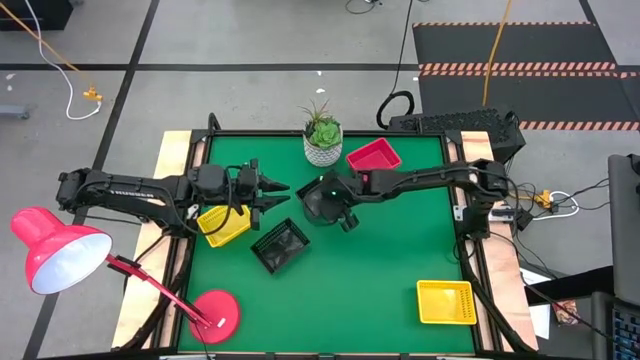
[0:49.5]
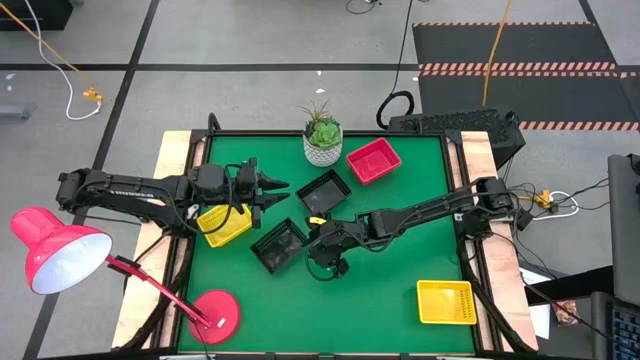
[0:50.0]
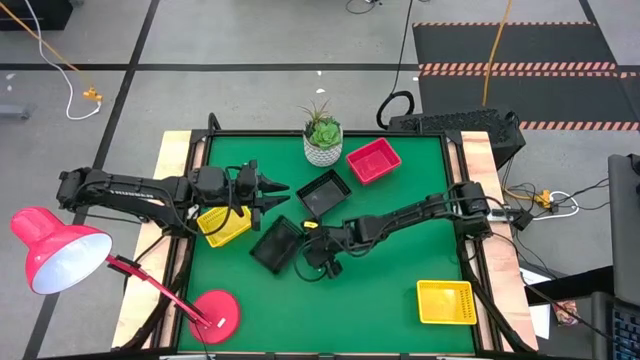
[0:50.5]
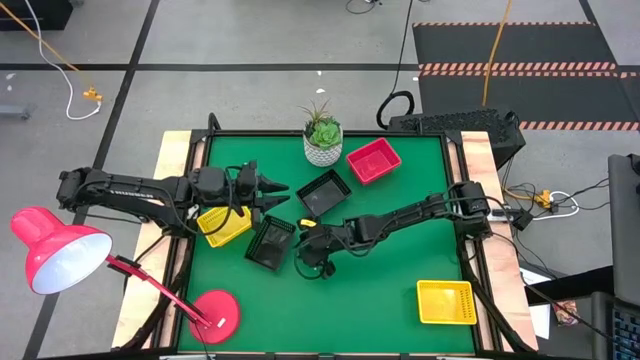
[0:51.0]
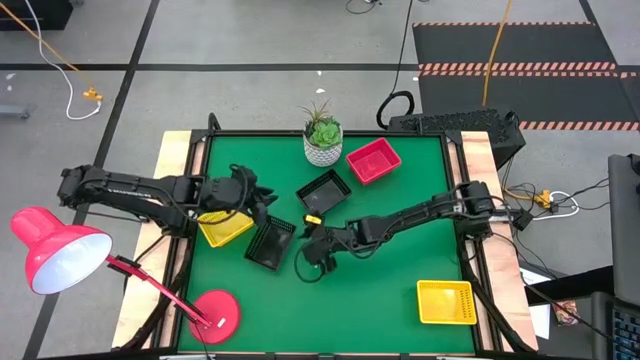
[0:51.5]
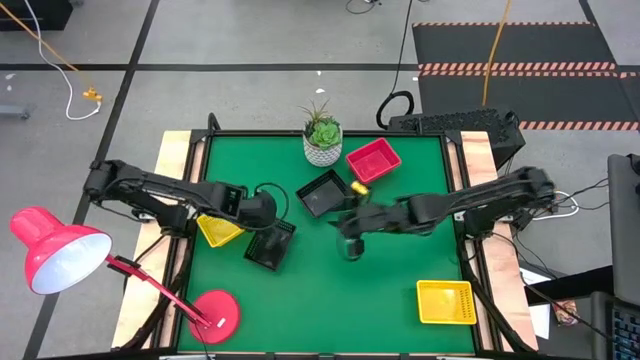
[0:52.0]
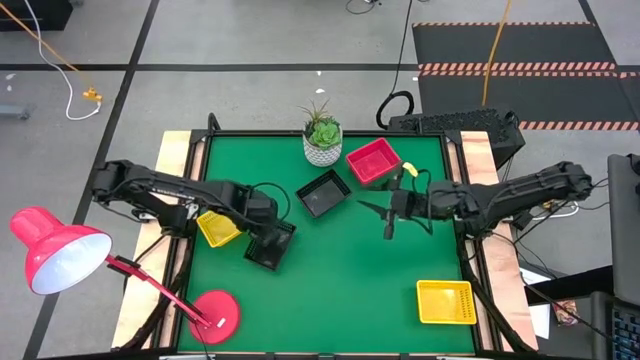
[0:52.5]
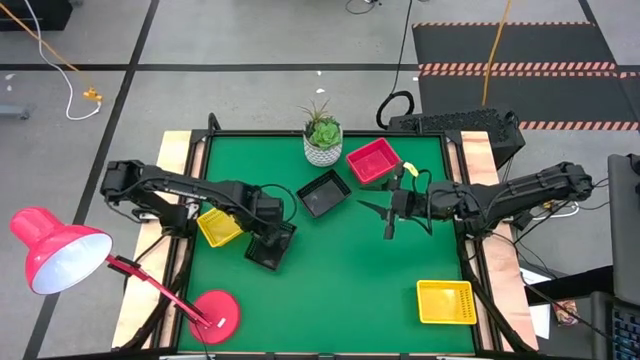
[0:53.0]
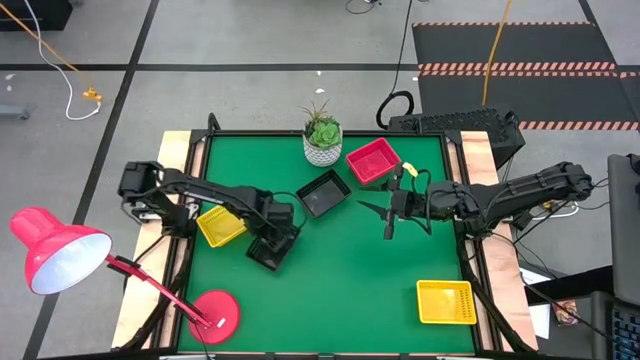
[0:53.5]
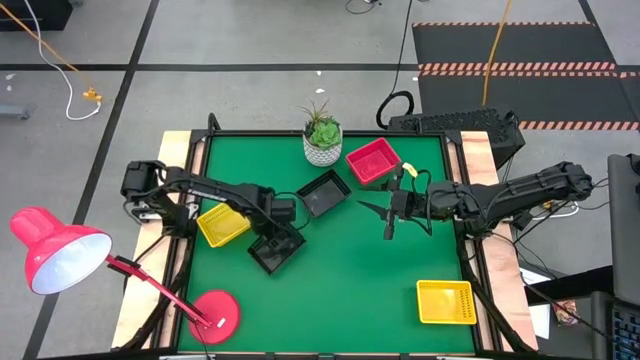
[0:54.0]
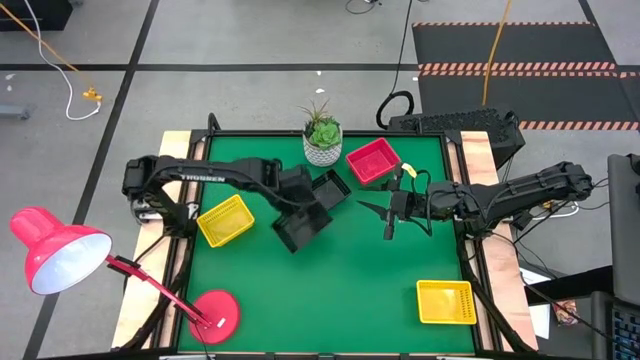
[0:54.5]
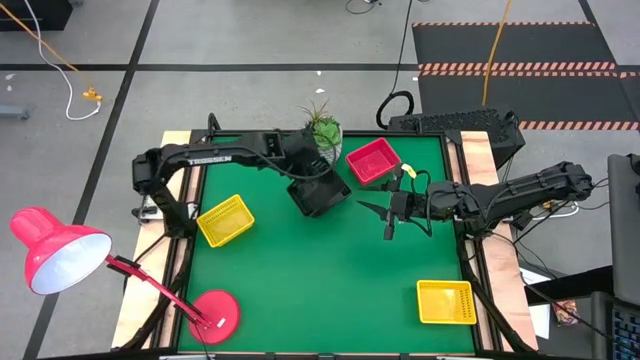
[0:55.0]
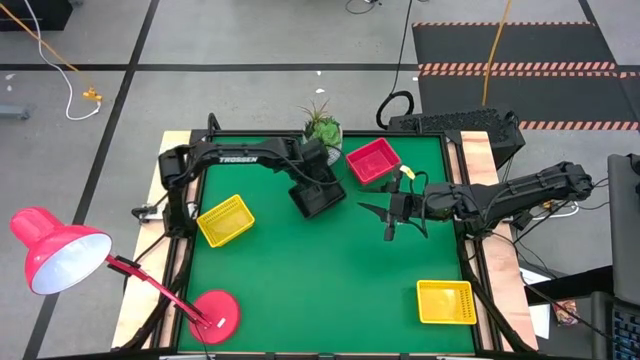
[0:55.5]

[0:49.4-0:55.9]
Stack the bottom black bin on the top black bins

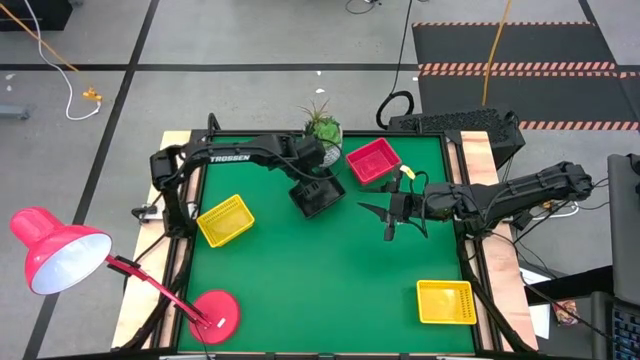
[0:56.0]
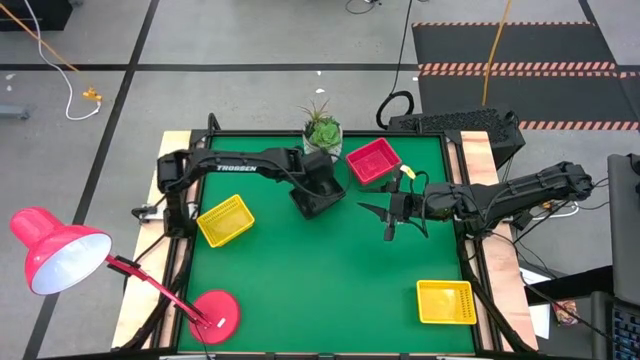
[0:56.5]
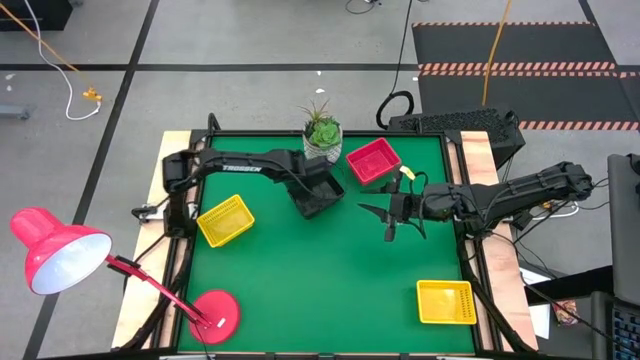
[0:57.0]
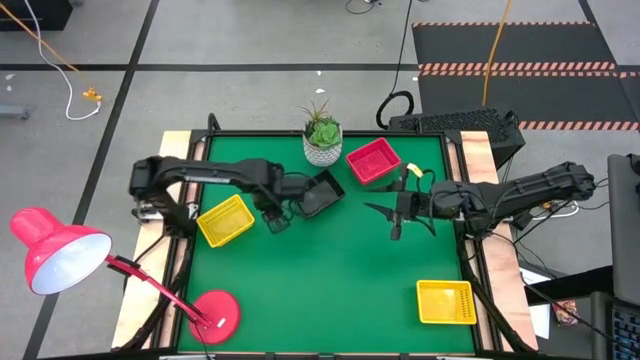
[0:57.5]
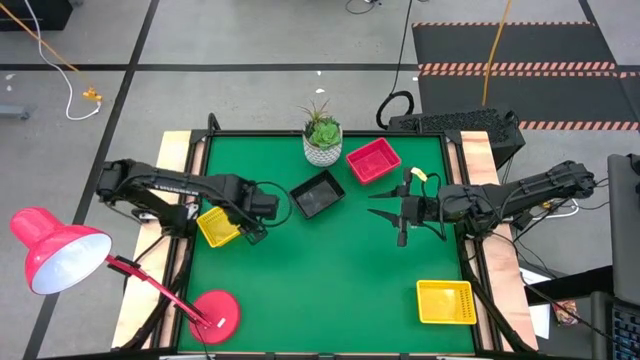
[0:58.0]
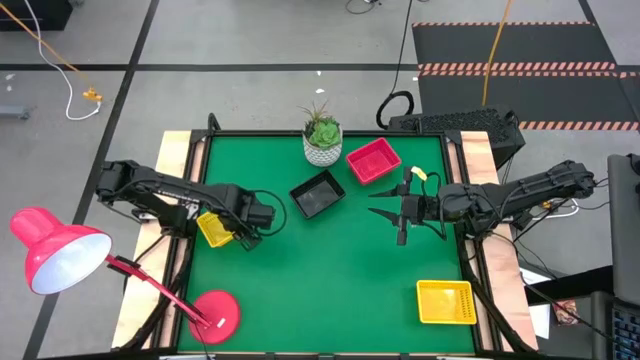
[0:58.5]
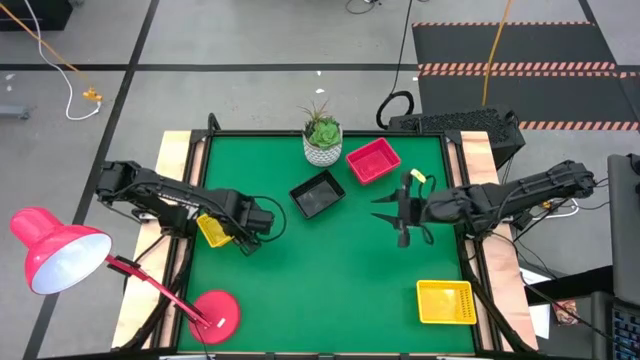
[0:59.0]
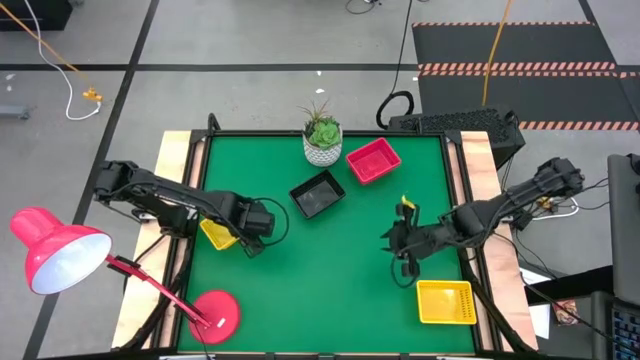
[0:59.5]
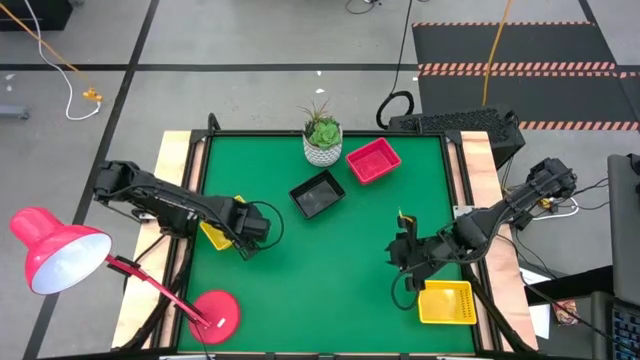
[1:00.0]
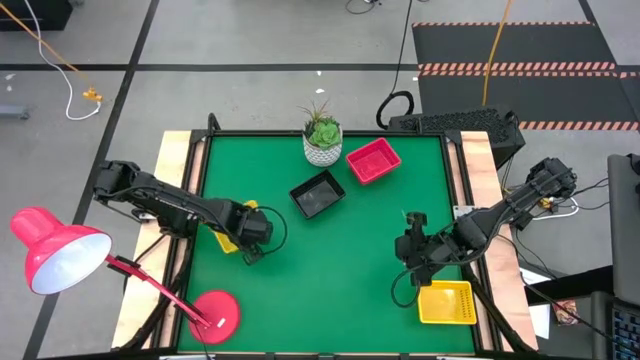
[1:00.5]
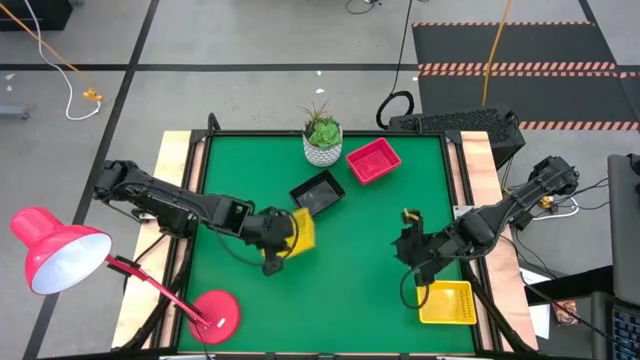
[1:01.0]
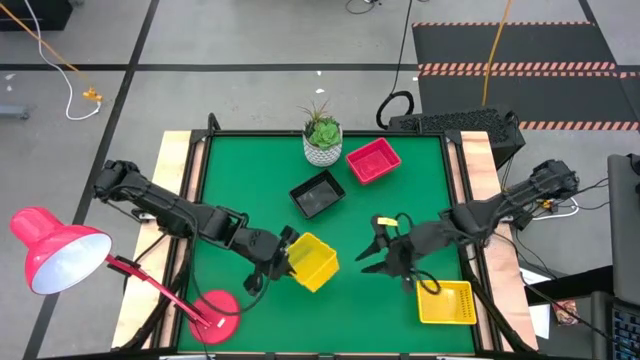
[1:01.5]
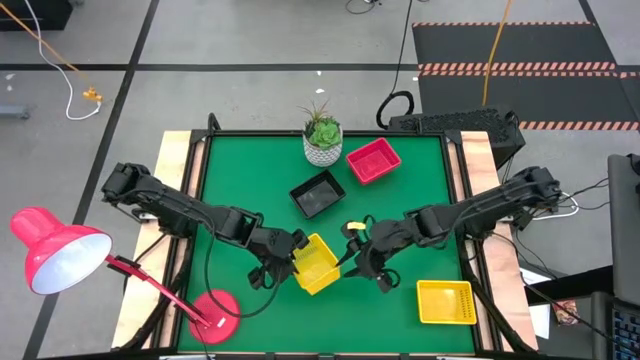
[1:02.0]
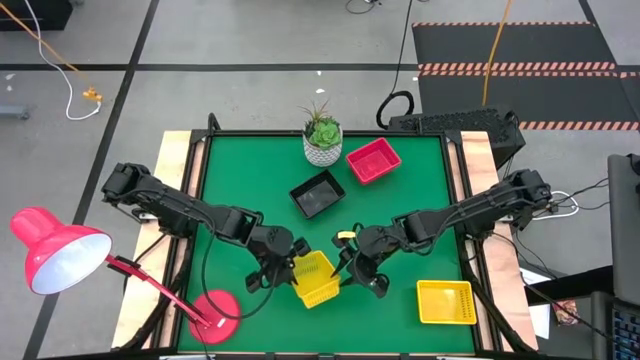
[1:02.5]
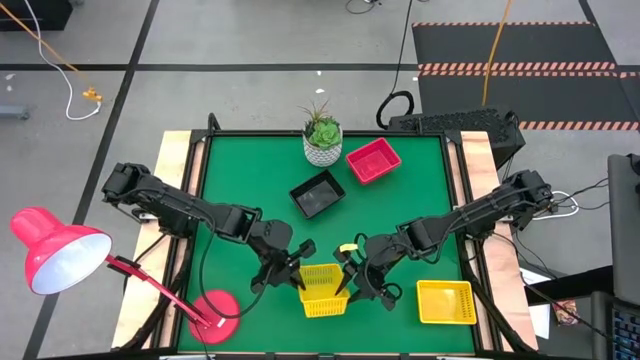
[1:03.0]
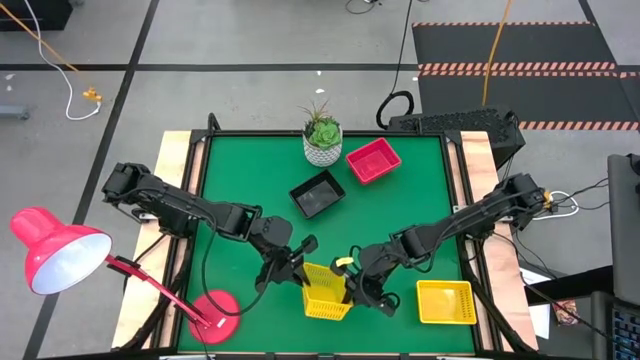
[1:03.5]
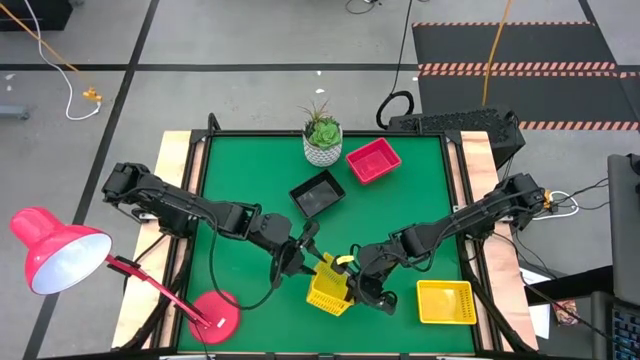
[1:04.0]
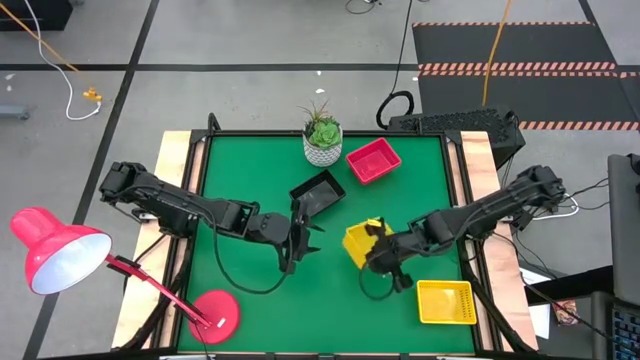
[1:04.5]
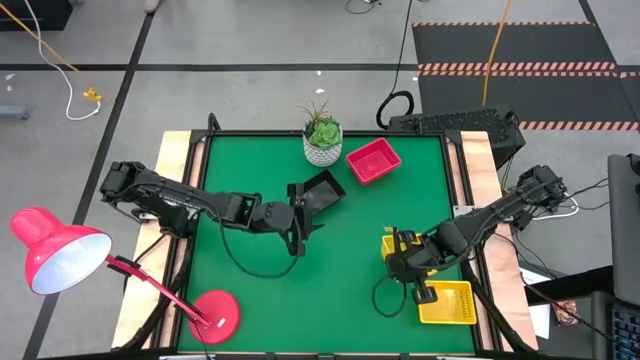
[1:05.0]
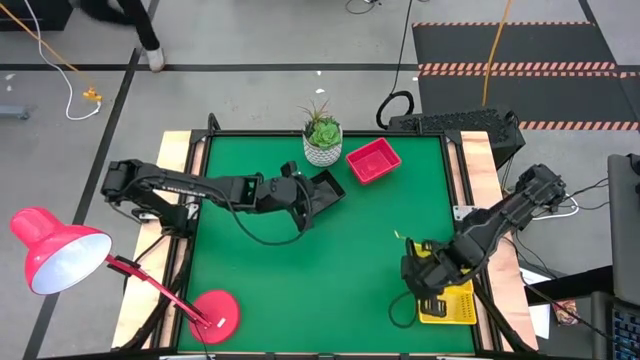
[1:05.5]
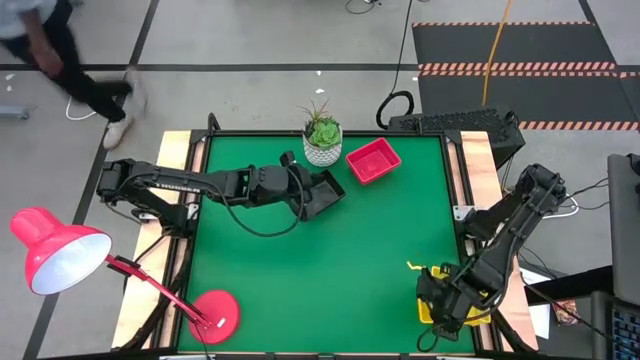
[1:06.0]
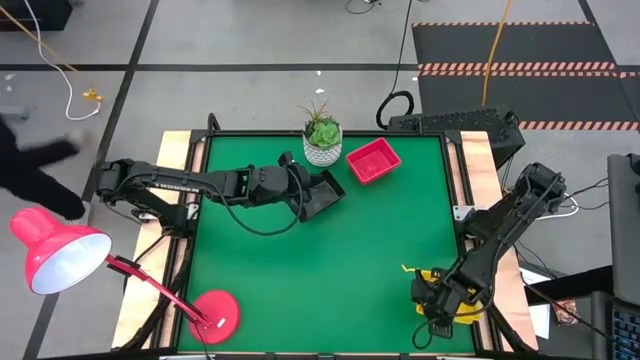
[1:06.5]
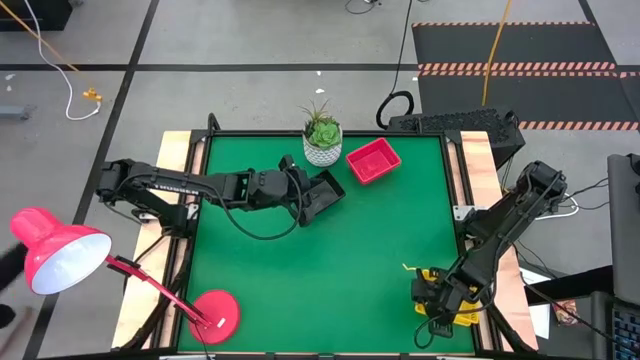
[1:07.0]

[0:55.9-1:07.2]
Stack the top left yellow bin on the bottom yellow bin

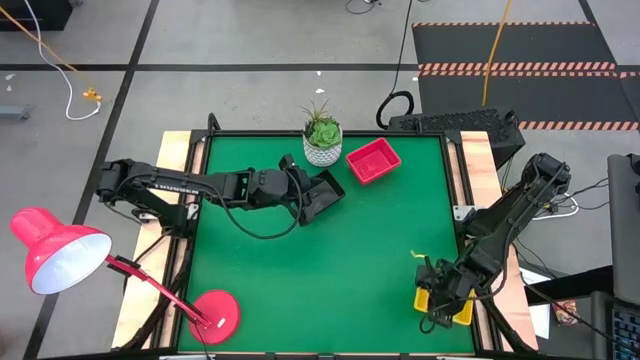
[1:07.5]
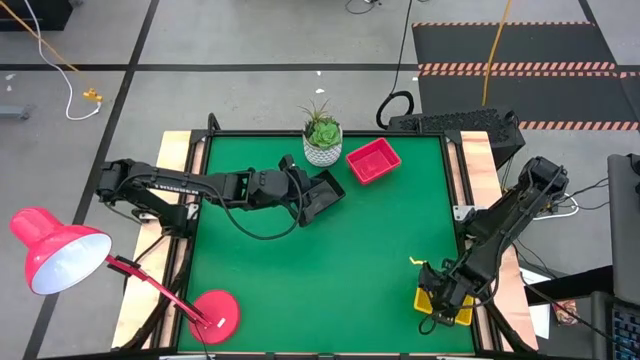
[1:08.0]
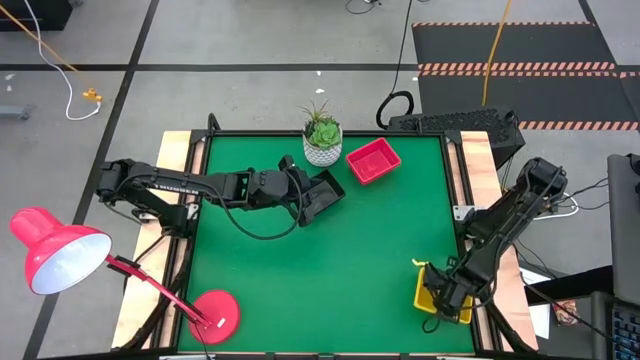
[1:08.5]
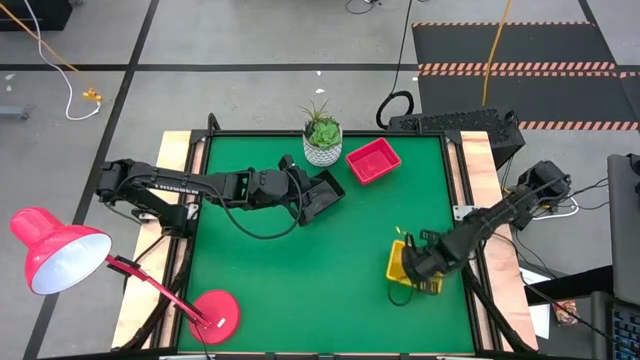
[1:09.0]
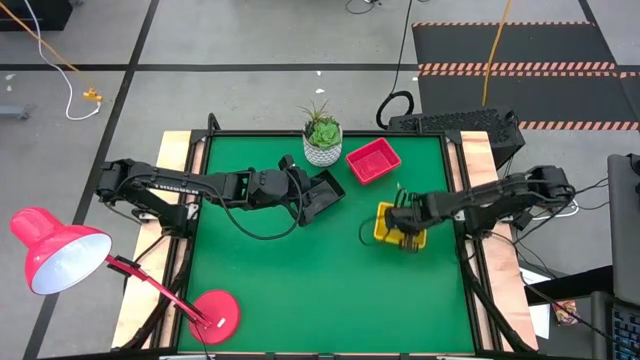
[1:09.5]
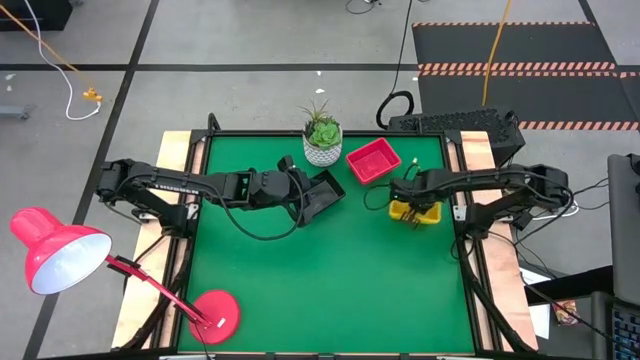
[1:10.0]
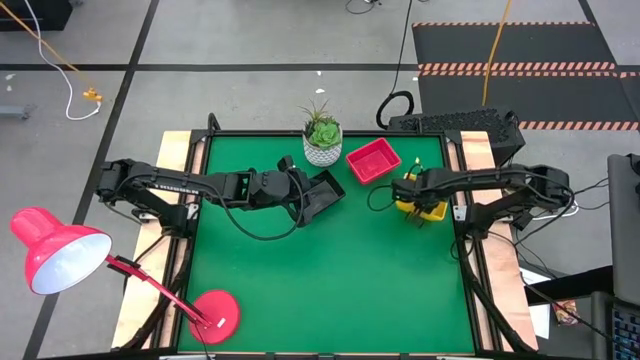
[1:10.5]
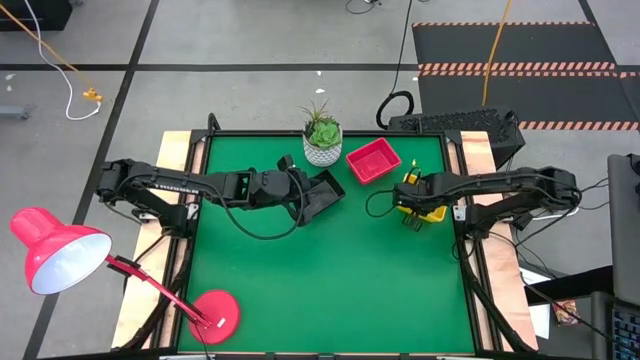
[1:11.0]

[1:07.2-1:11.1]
Move the stacked yellow bins to the top right of the table
